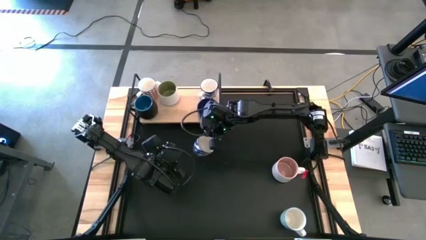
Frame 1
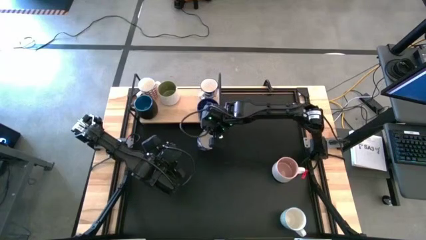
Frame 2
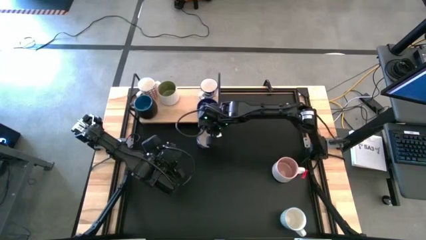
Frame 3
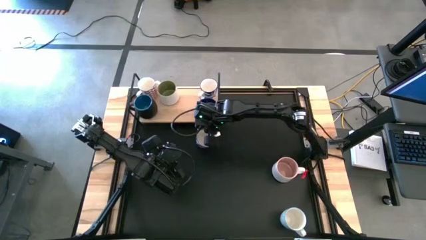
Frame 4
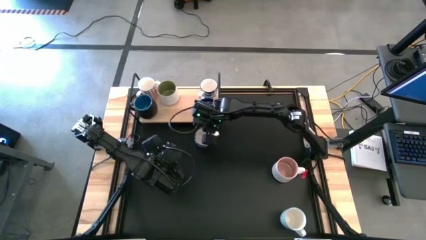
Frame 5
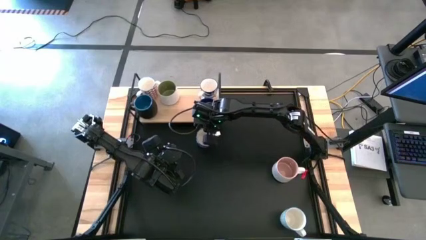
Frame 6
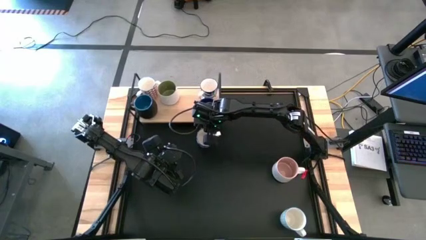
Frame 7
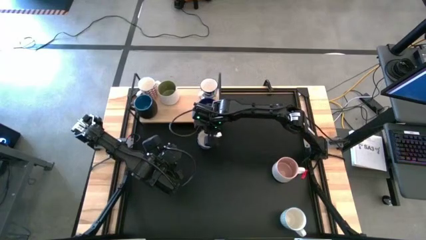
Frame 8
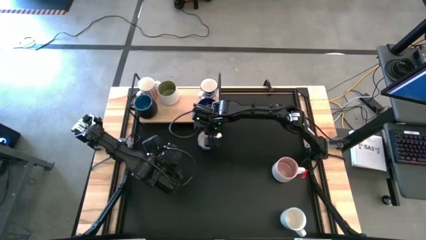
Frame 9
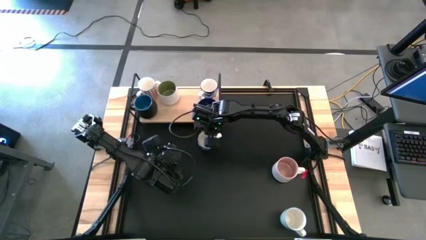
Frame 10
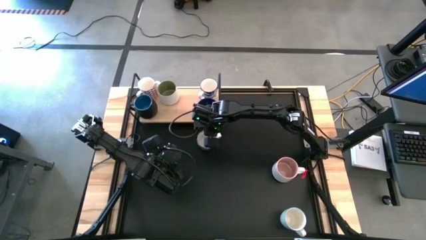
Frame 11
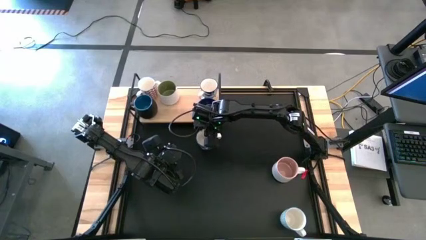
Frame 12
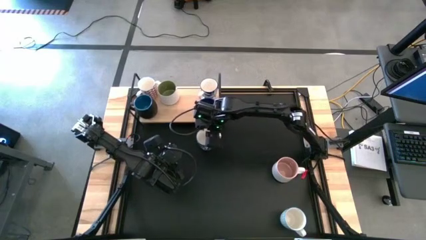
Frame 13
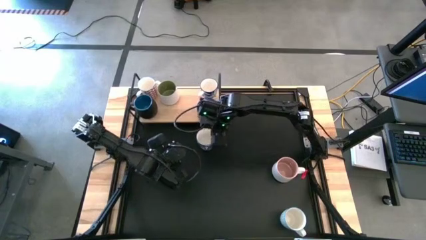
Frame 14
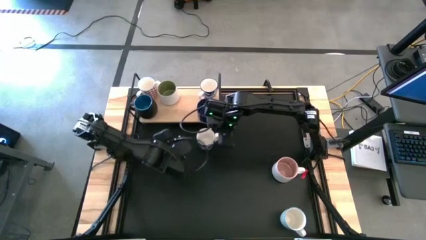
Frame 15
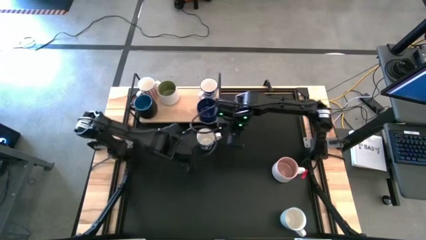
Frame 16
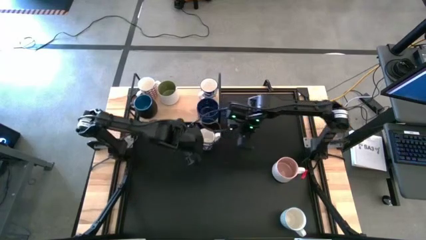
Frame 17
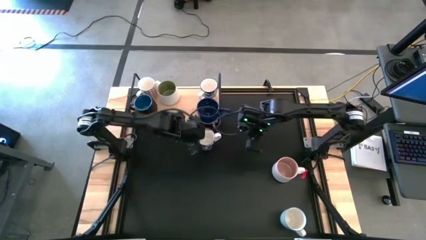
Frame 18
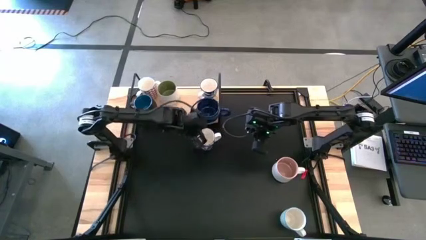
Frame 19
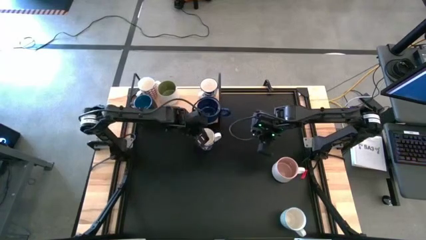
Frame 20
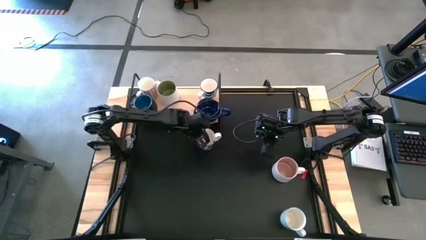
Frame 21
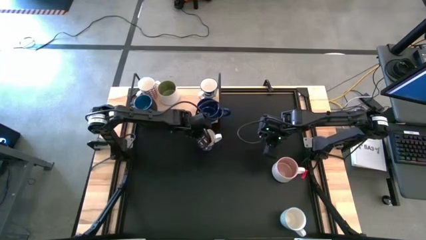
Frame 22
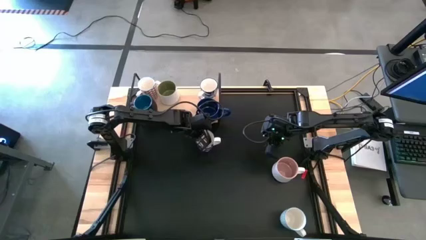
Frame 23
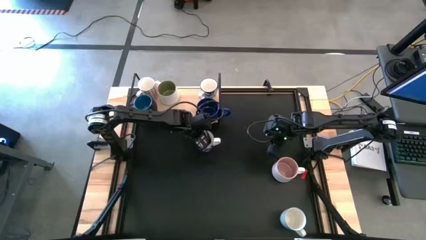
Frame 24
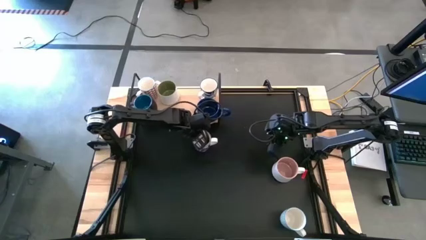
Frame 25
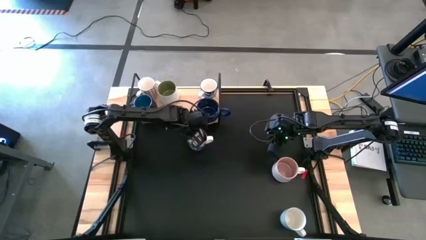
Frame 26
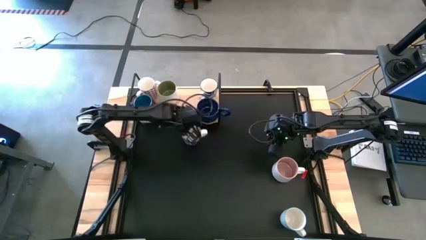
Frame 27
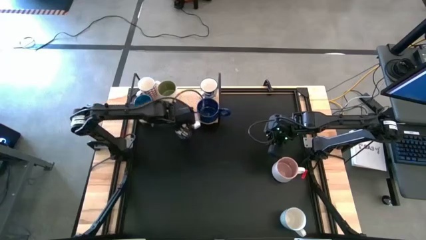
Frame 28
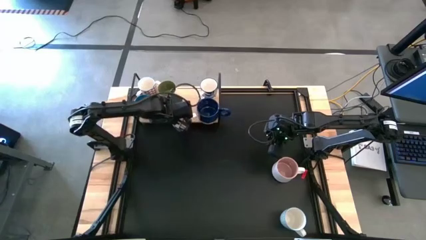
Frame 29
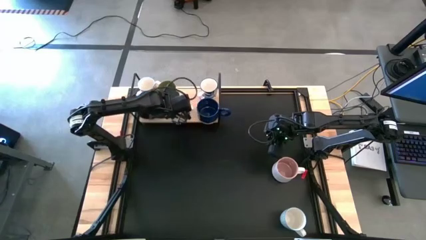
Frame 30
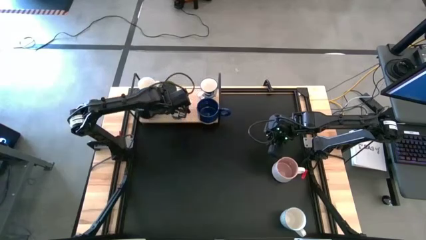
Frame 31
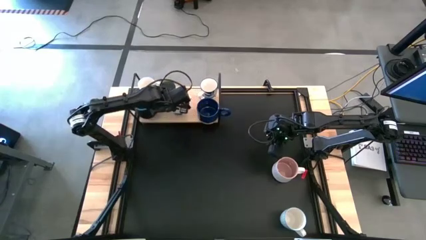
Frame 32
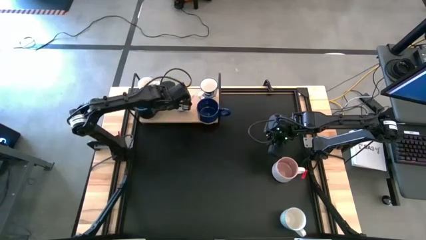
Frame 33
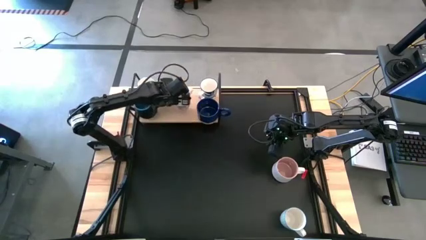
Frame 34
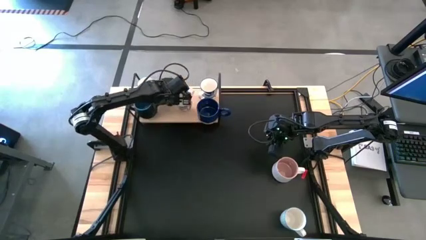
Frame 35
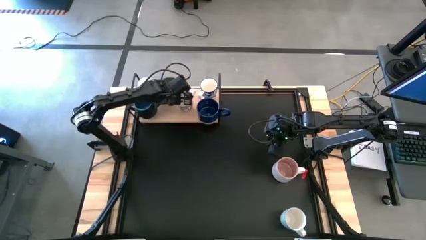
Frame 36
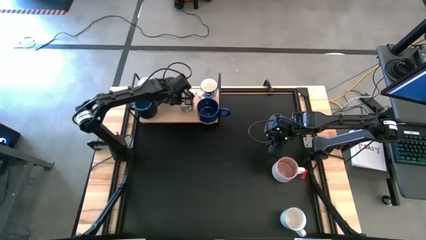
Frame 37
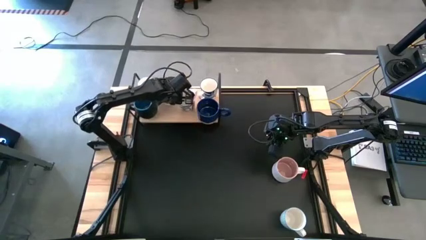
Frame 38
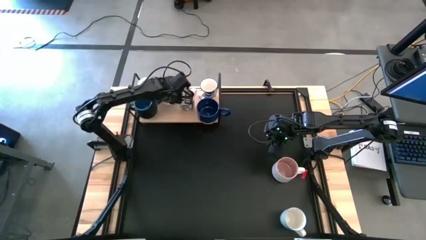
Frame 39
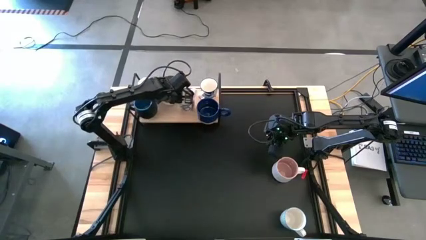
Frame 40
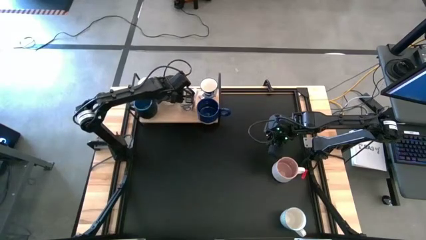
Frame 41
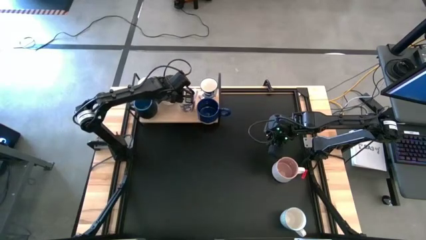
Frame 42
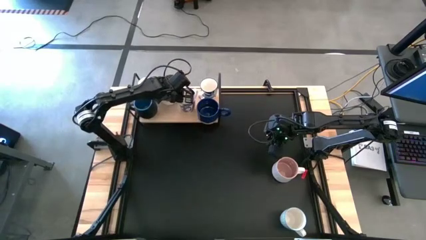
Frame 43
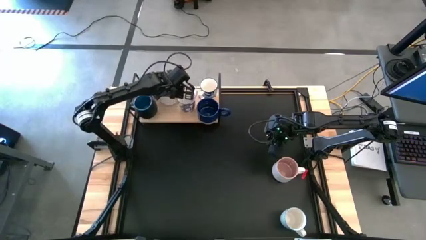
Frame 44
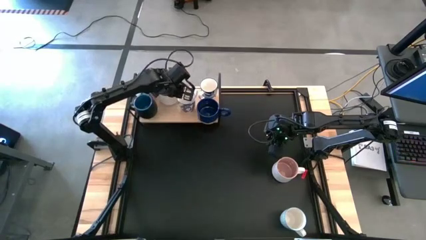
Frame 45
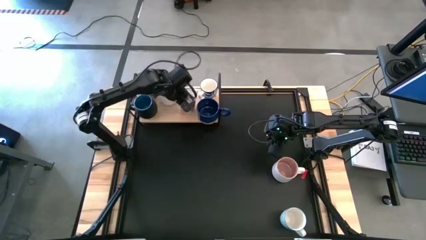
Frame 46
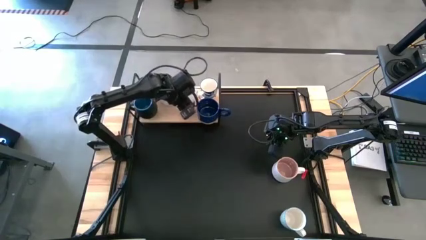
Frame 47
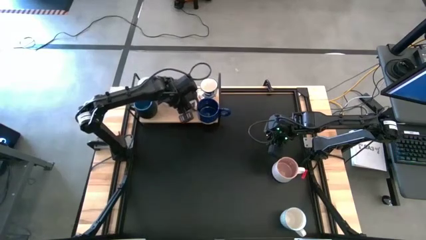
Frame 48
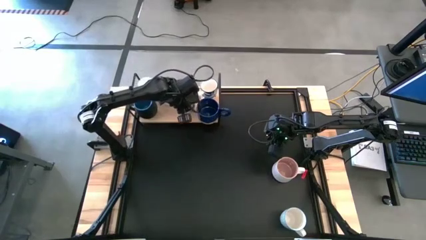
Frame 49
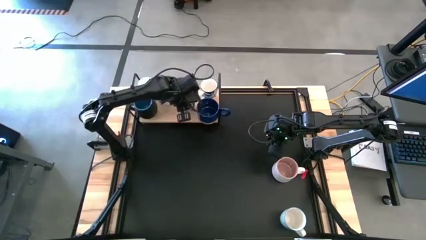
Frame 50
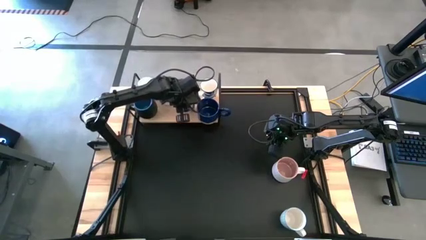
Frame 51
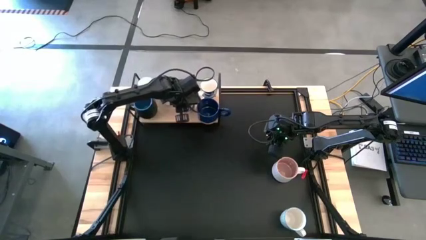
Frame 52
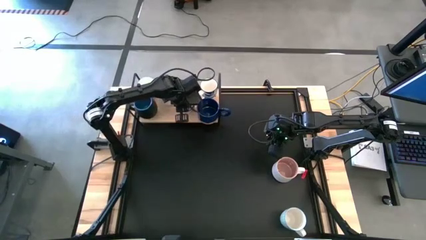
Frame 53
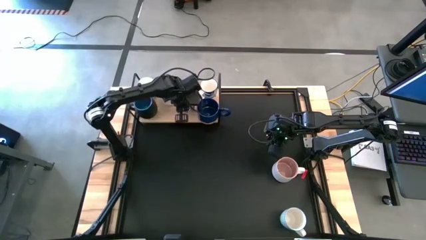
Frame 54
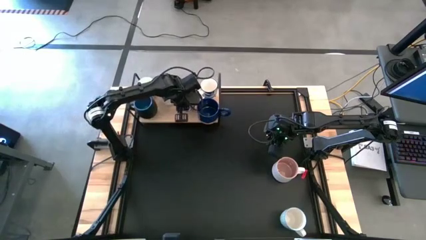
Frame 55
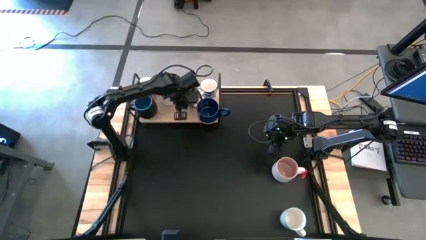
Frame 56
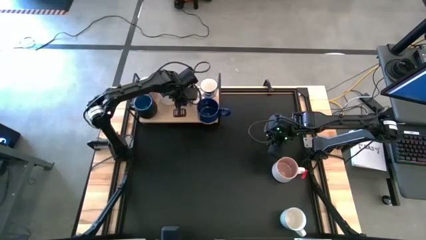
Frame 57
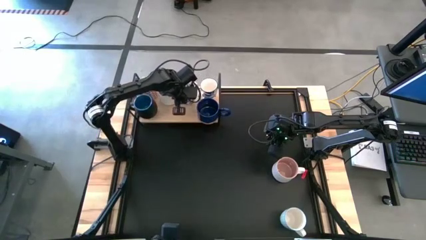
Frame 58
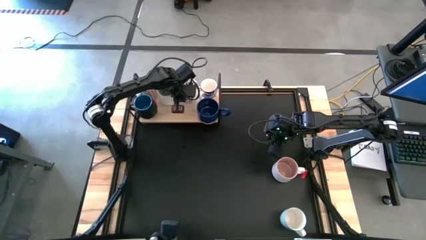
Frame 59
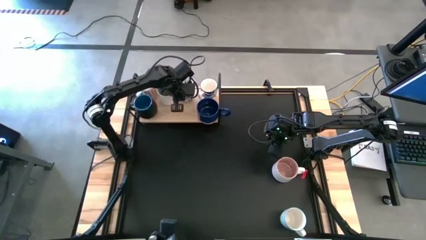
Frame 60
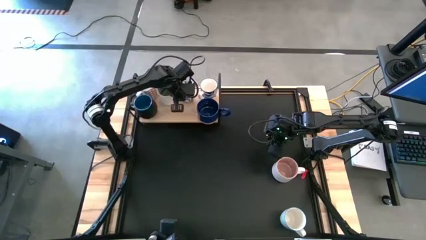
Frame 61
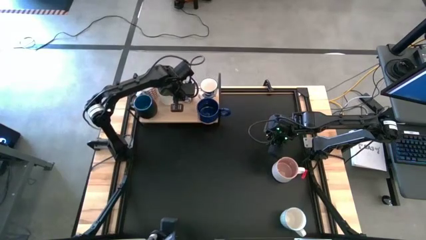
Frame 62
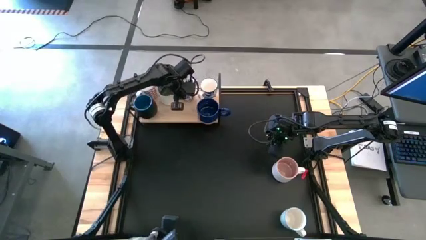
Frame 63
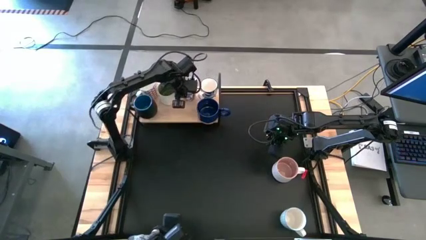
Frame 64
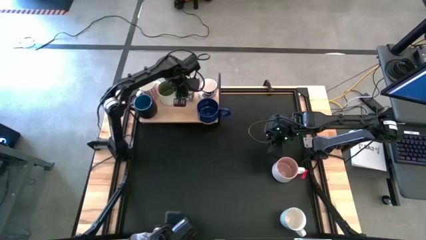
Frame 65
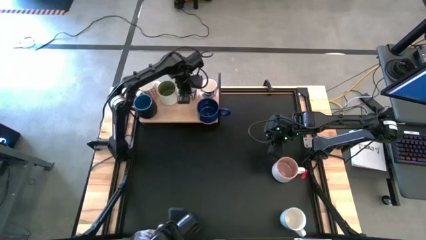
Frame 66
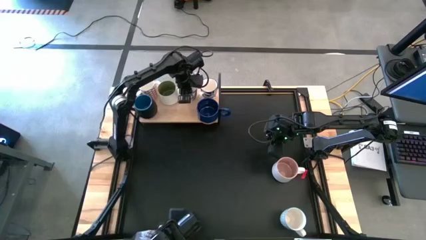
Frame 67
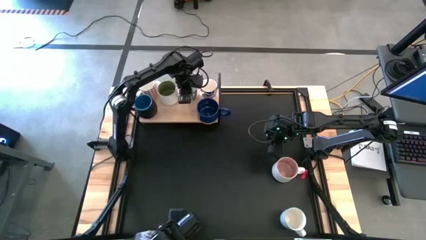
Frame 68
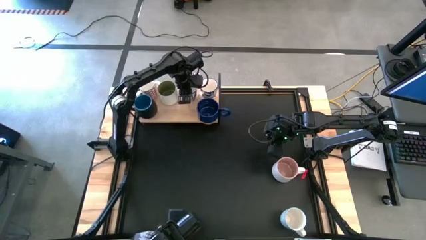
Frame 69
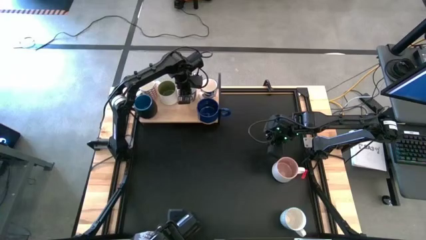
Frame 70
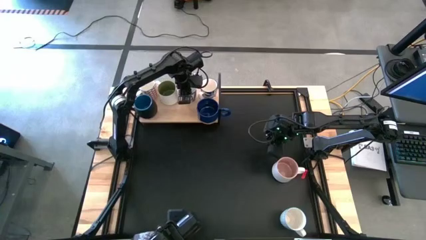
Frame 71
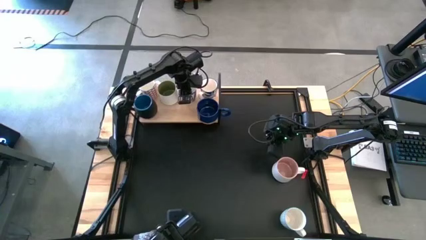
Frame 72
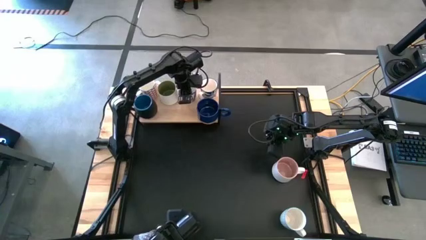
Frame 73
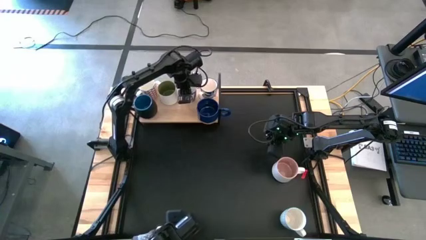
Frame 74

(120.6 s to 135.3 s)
Task: Place coffee mugs
Put the blue patterned mug on the shelf

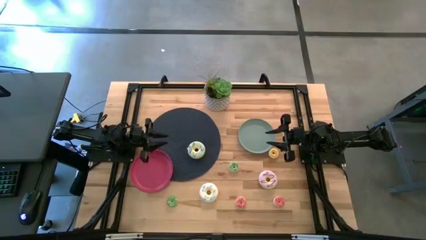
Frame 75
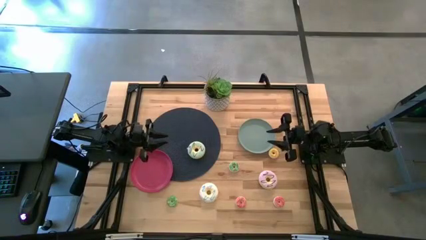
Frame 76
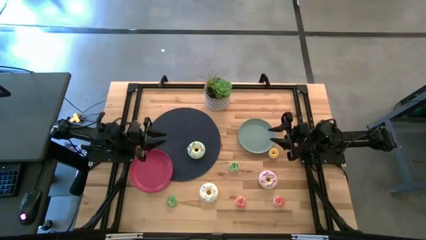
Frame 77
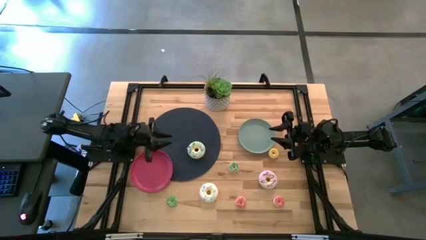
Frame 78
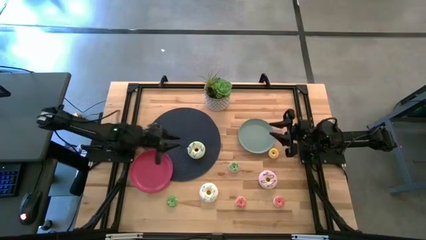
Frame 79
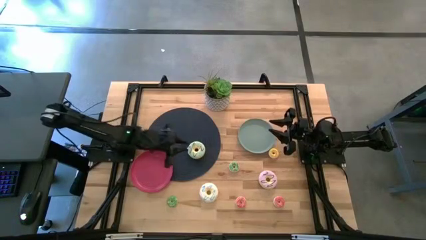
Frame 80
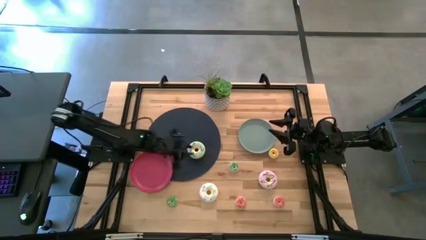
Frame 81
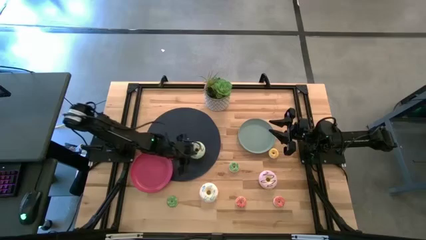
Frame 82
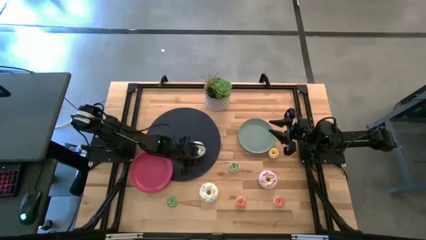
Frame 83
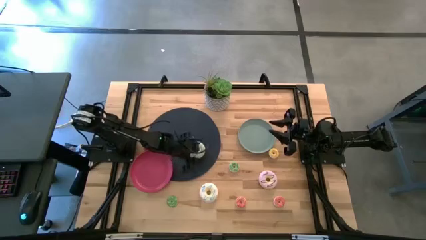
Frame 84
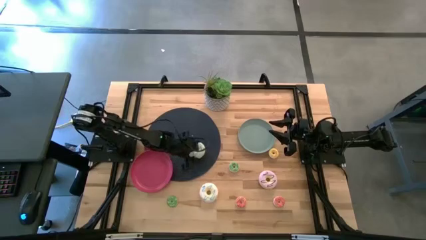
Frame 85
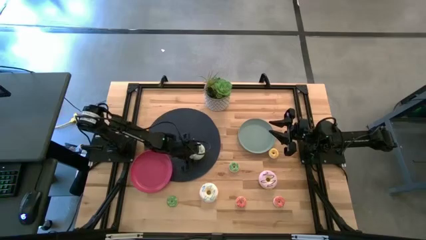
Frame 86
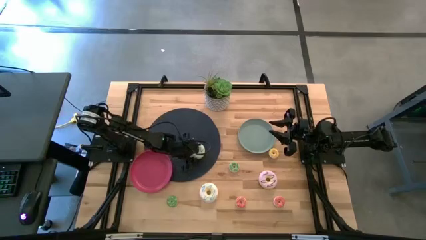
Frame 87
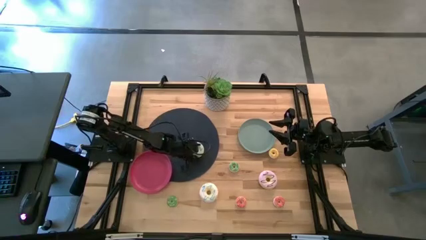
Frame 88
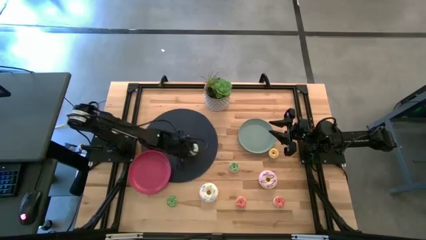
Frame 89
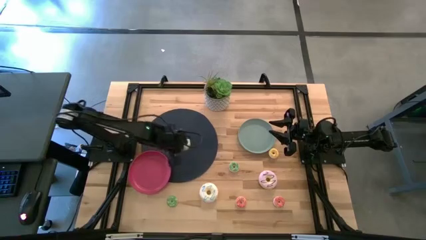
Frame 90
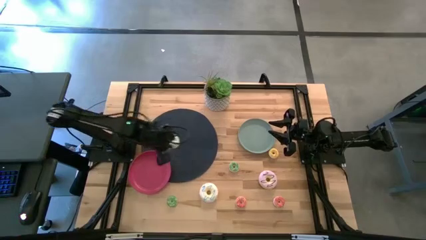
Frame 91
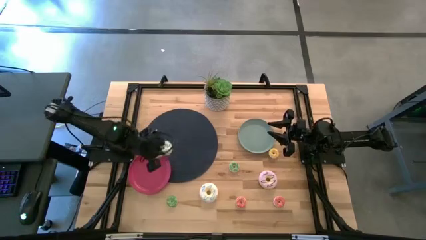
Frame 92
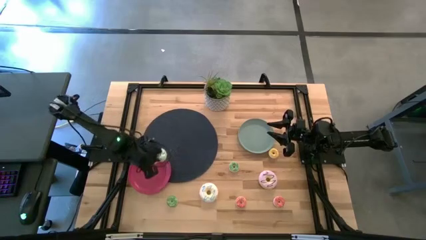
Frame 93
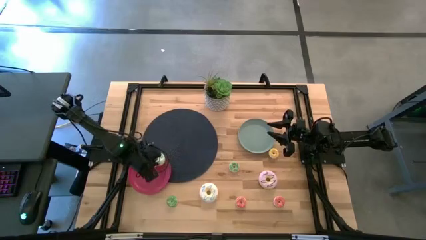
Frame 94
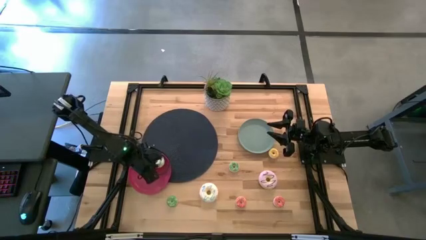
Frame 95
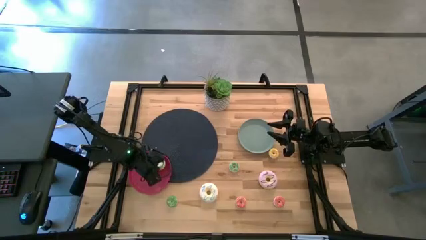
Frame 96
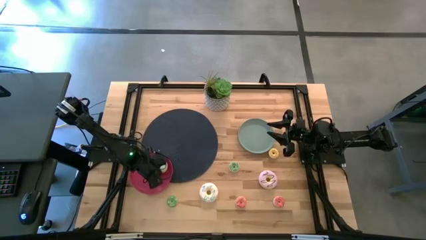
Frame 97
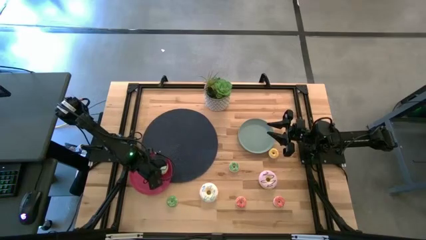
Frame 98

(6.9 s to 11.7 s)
Task: Pick & Place donuts
Put the large blue donut on the red plate
